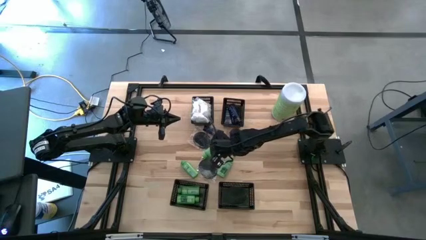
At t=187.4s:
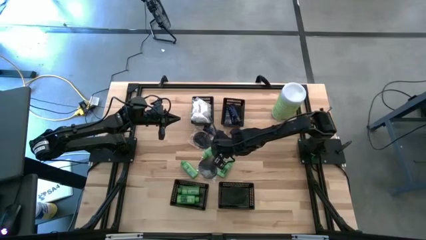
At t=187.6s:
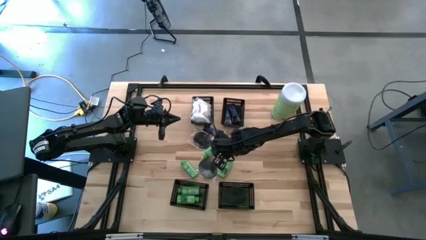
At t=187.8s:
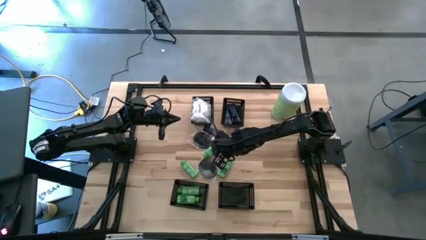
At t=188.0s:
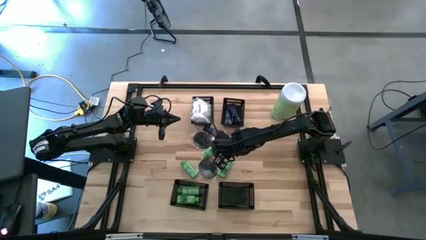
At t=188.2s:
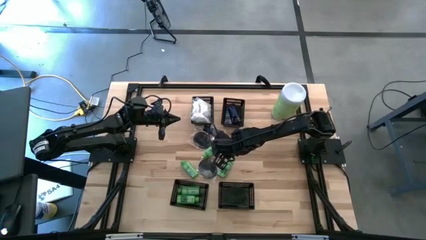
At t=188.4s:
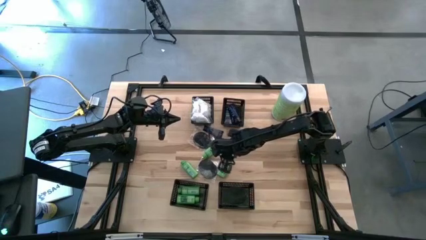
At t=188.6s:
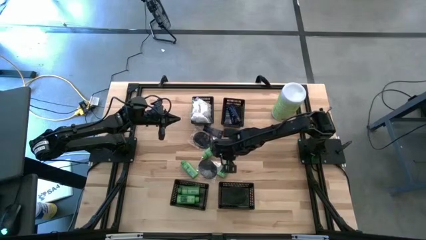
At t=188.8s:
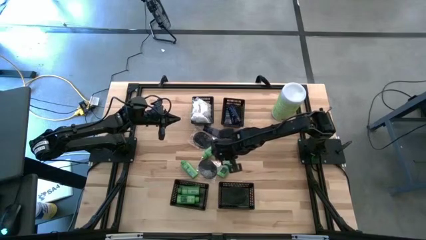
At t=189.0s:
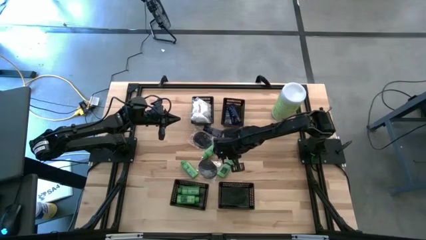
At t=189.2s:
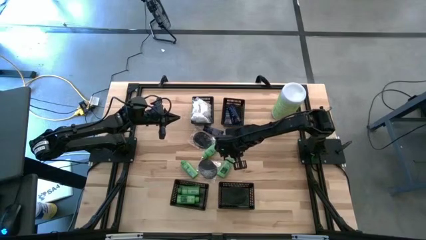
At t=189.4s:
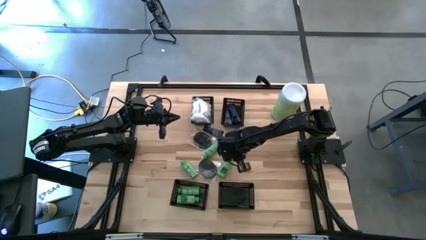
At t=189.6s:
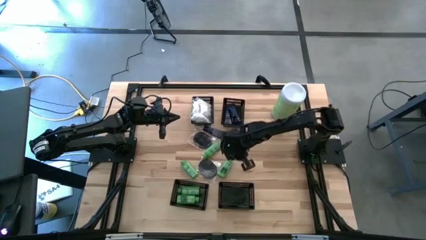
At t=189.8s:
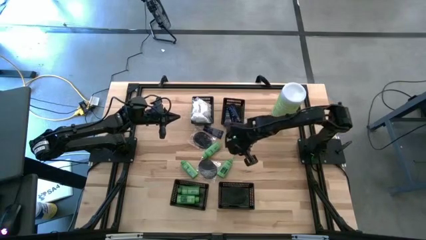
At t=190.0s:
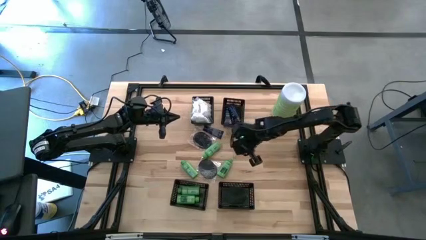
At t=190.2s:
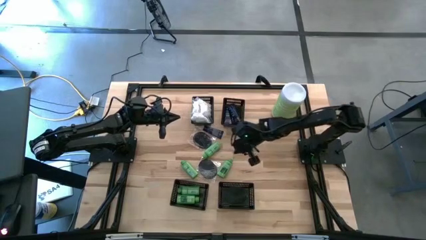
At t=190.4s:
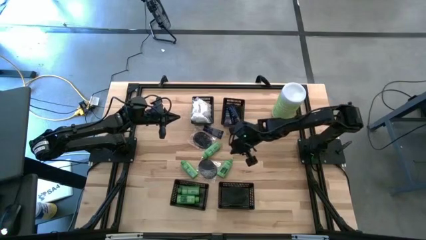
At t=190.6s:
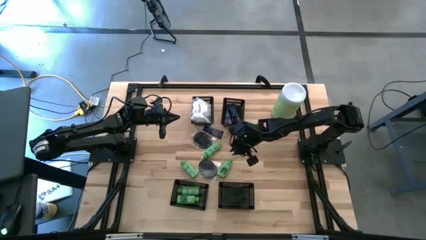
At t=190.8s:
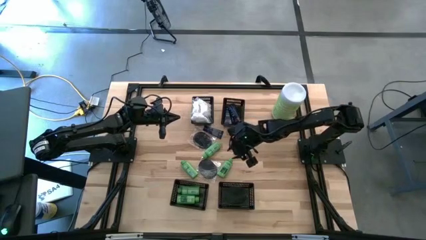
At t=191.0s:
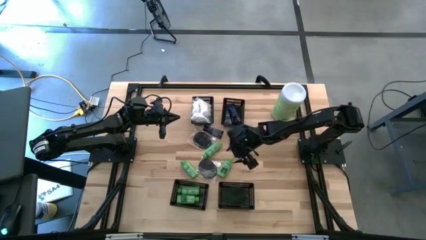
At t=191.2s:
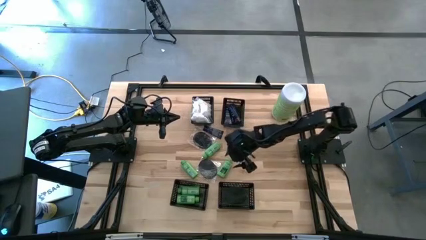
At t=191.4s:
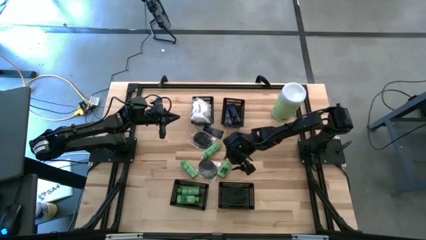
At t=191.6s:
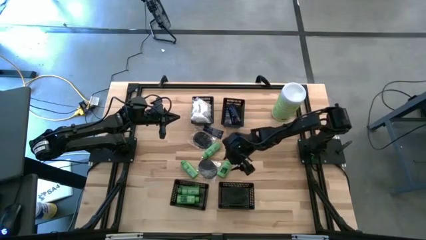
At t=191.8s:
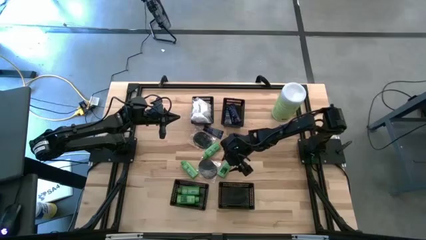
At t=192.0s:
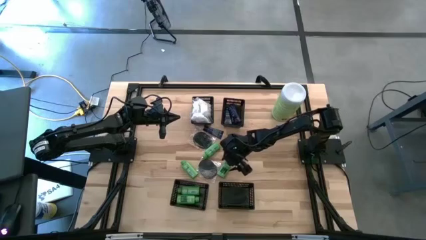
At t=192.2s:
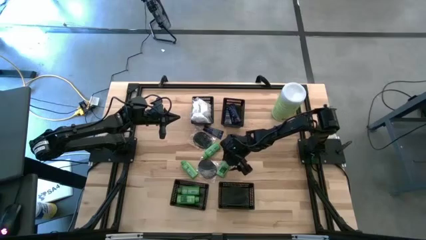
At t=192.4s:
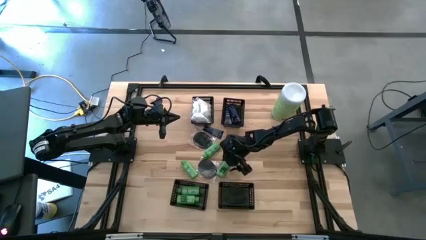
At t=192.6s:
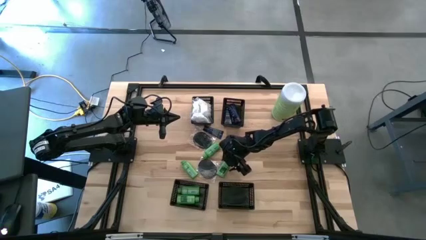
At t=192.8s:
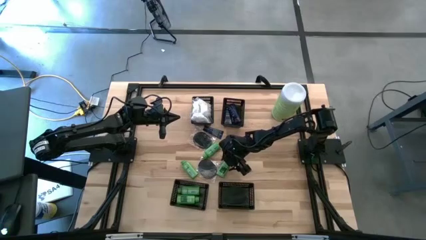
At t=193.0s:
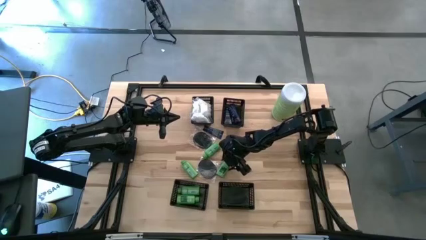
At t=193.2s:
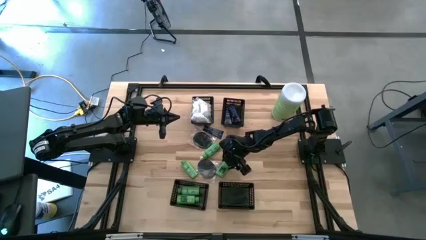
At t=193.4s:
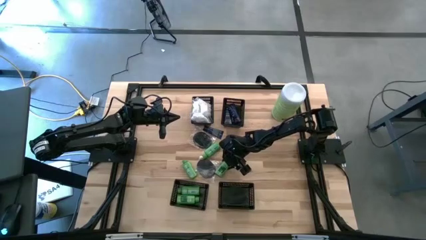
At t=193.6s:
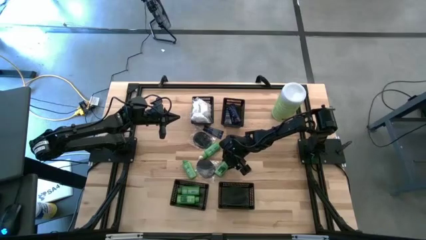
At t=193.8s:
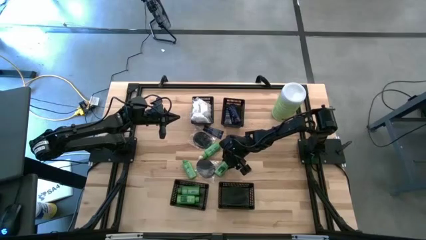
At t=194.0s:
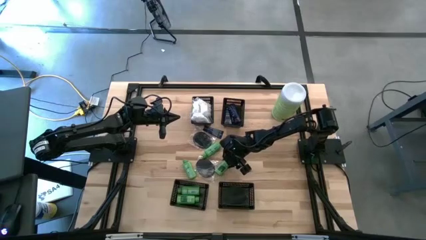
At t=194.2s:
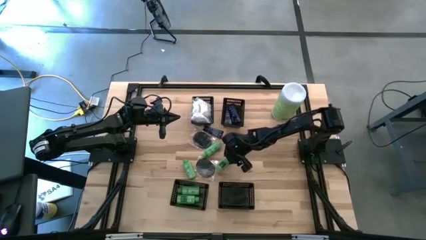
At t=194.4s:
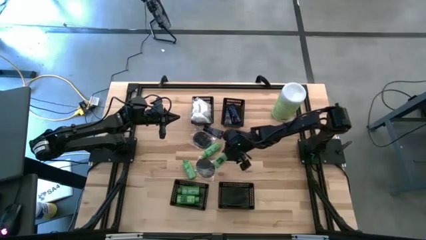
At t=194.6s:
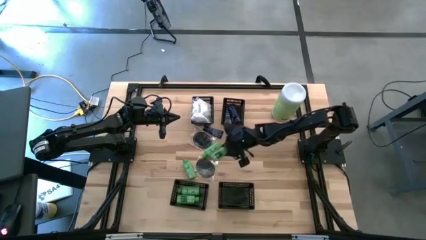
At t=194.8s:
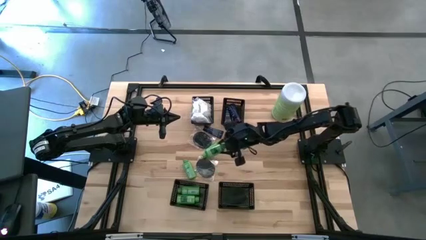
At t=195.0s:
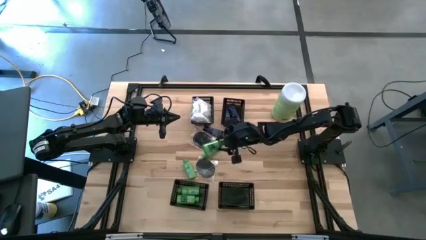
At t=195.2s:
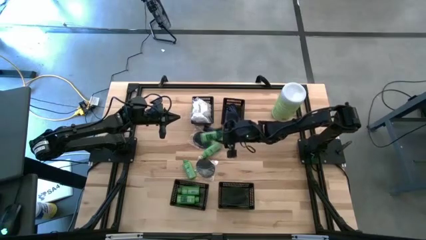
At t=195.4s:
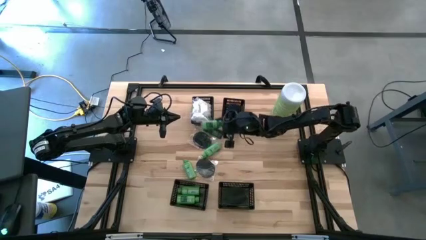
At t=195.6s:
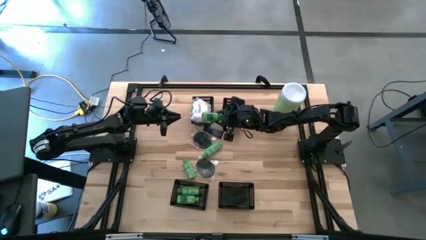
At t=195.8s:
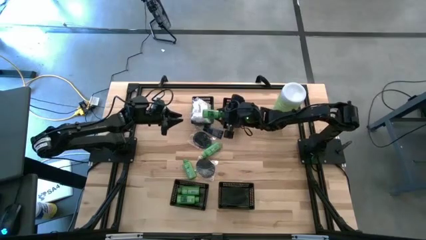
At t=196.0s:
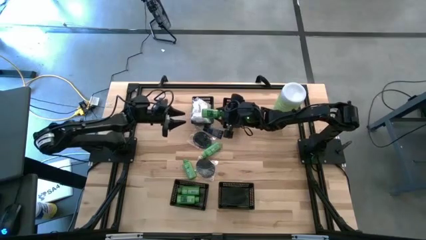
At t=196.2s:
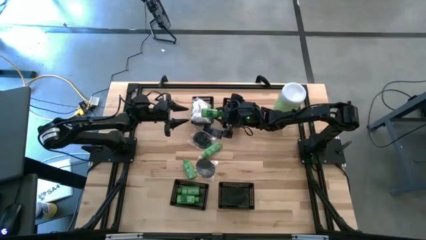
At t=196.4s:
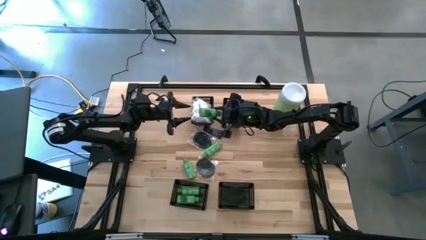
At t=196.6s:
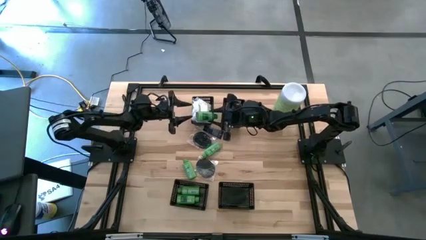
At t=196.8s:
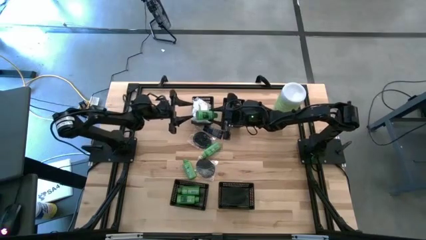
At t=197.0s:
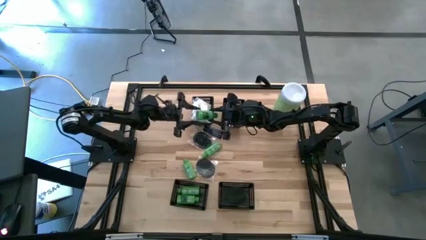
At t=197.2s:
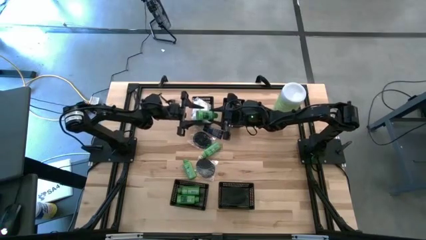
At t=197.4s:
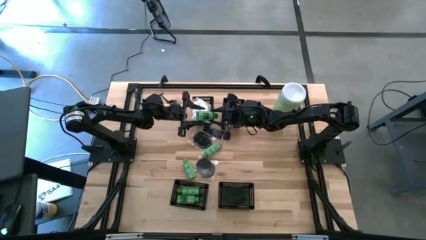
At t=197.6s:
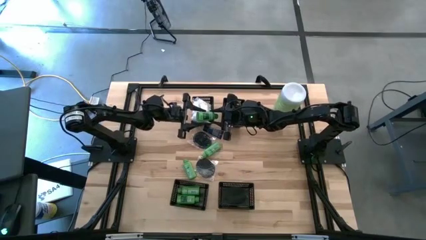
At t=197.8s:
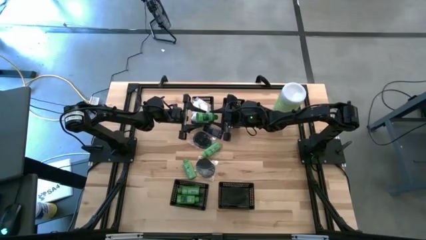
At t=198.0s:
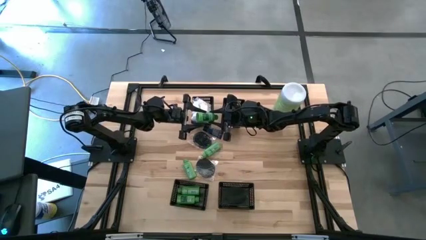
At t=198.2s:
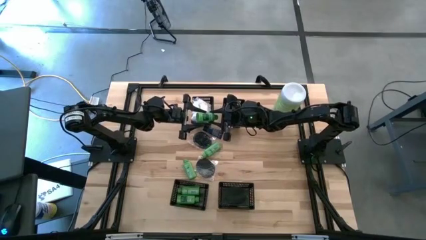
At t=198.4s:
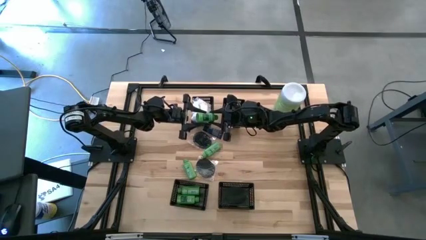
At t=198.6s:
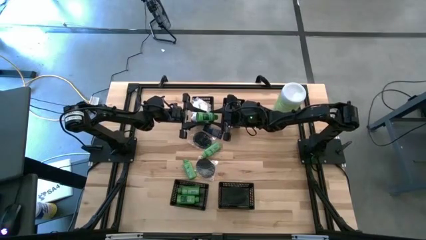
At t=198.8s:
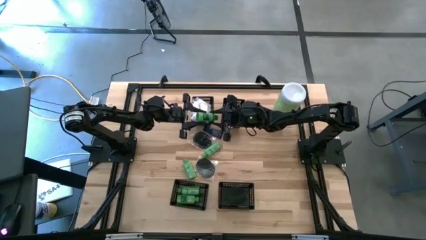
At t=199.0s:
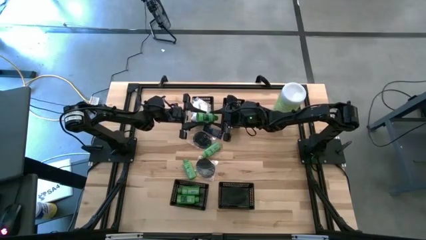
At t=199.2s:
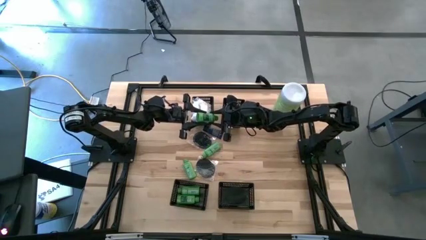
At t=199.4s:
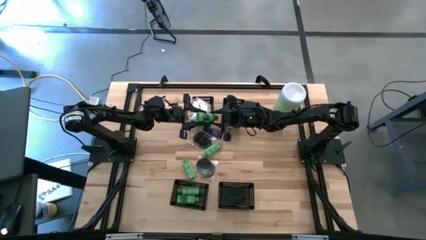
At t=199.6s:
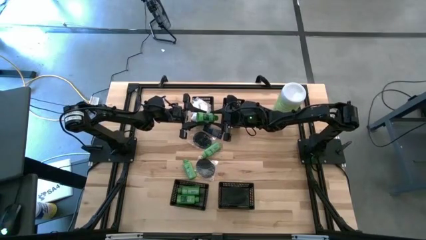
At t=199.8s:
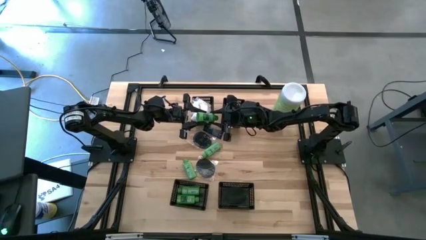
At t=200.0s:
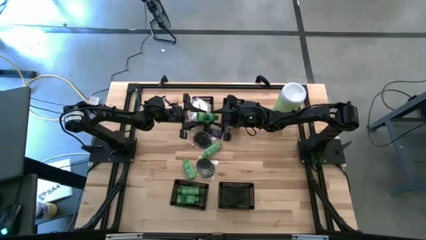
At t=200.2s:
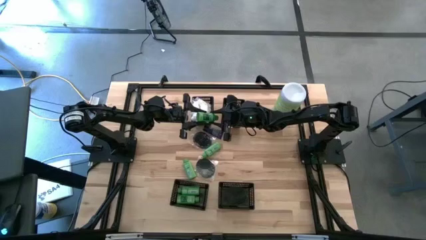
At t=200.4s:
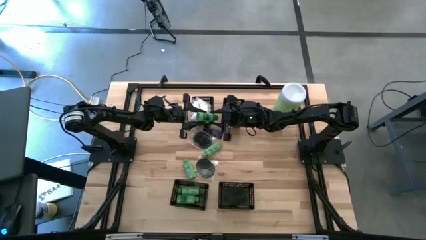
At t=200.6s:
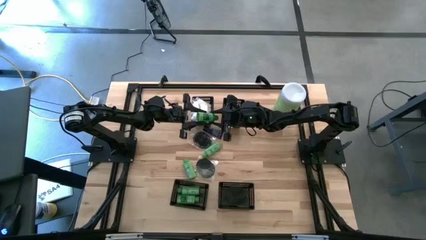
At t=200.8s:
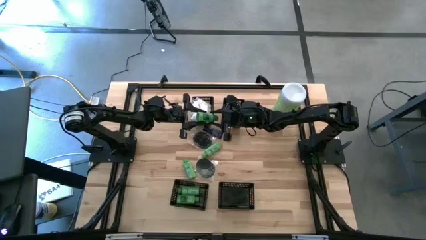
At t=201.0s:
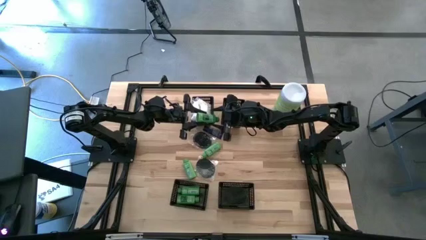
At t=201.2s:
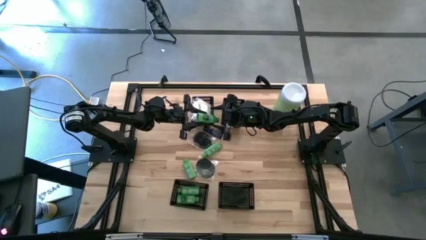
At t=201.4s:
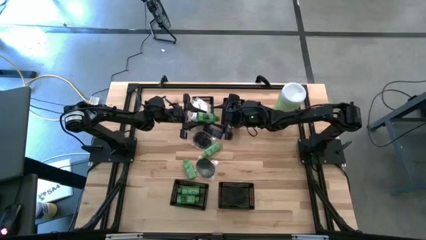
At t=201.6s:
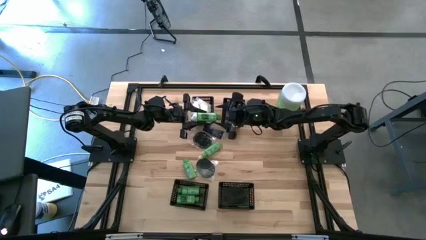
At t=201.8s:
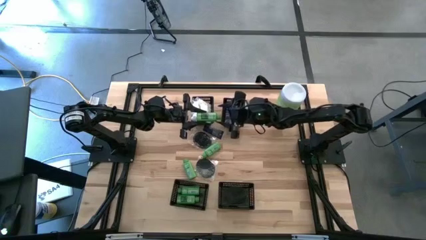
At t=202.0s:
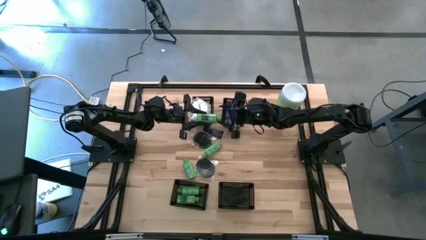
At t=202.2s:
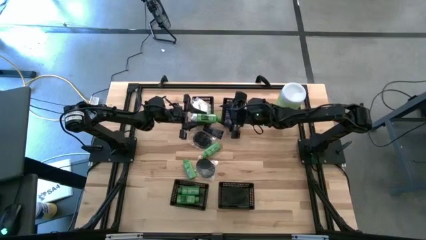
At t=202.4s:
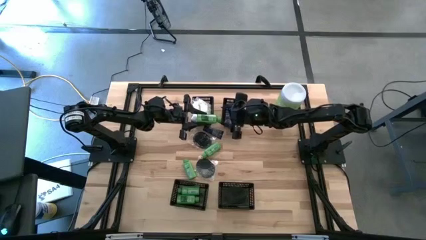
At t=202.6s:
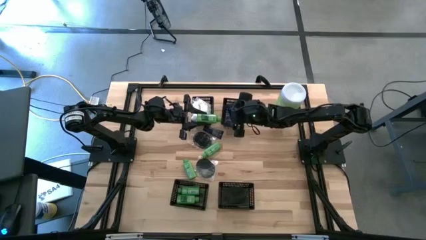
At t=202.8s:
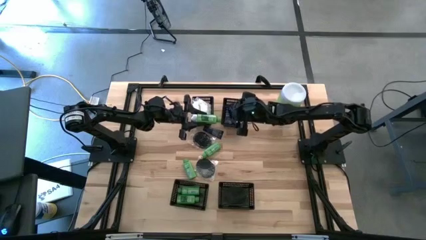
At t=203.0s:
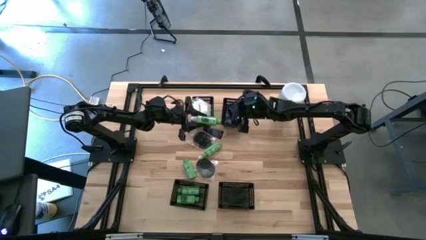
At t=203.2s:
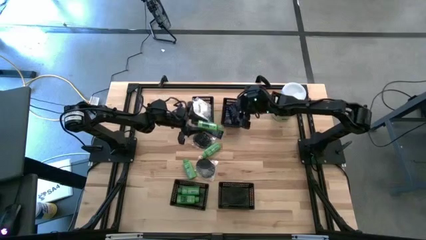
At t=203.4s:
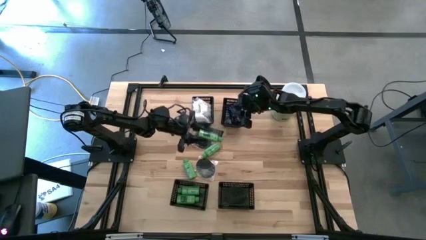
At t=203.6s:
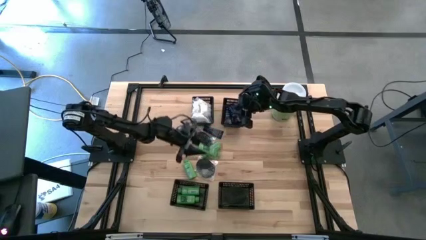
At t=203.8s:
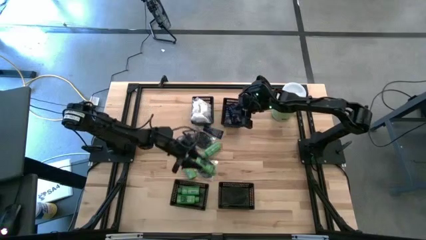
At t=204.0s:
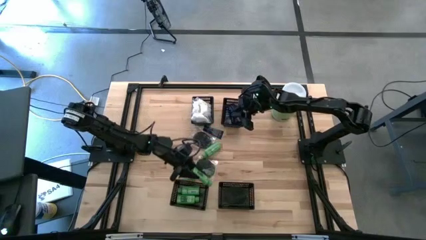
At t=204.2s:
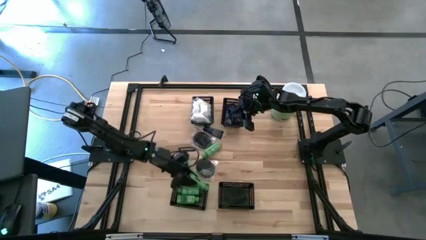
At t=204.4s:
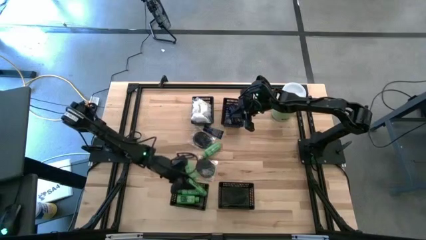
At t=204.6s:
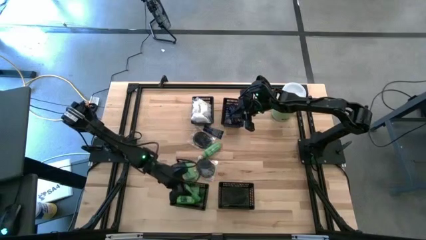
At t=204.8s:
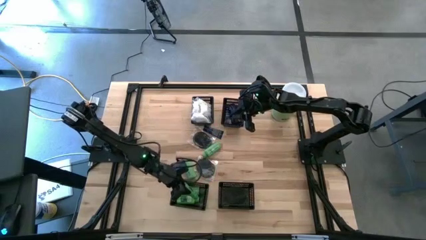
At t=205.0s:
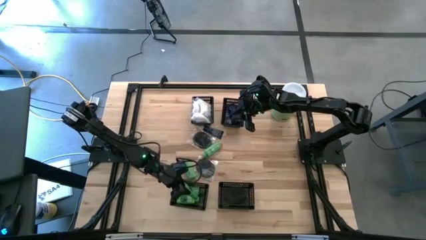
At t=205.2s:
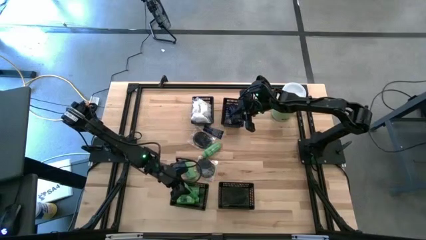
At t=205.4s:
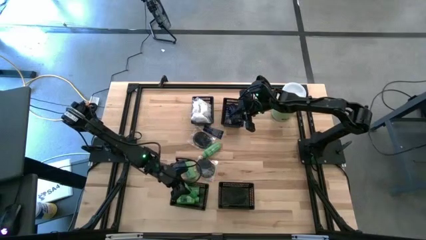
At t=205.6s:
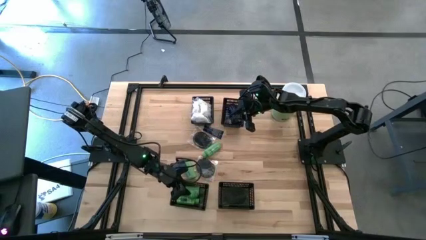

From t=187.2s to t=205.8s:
Task: Pick & Place Travel size toiletries
Put the green shampoo into the bottom left black bin
